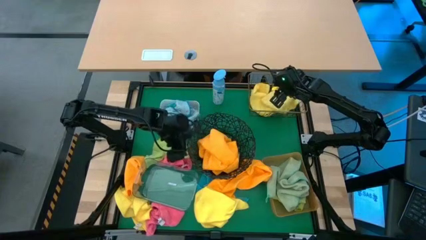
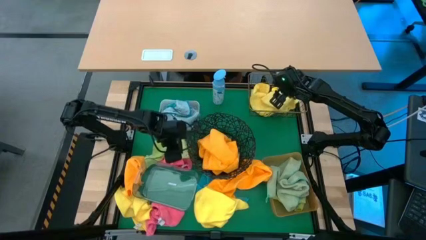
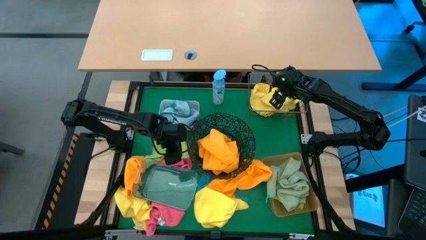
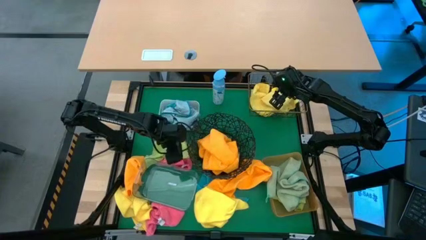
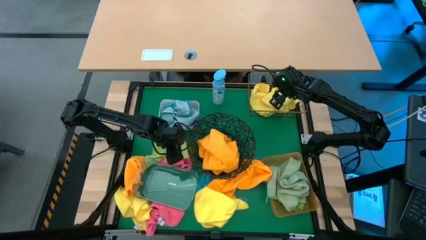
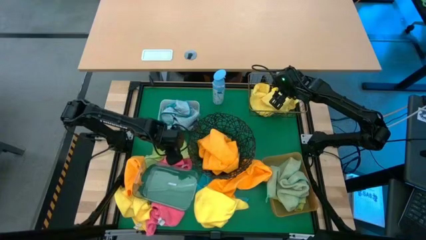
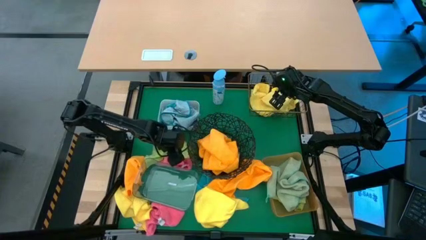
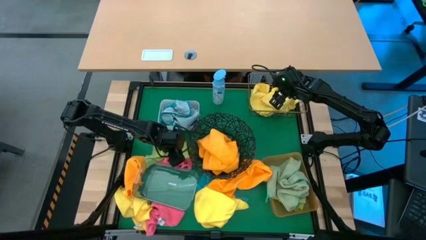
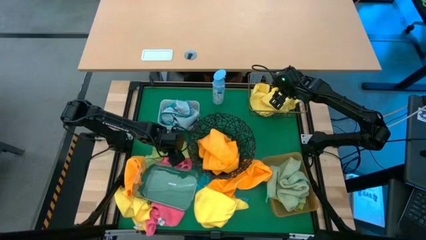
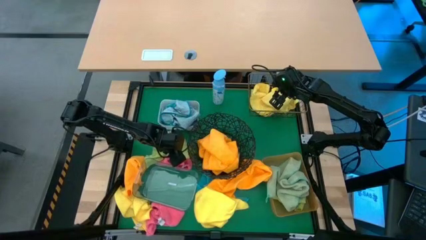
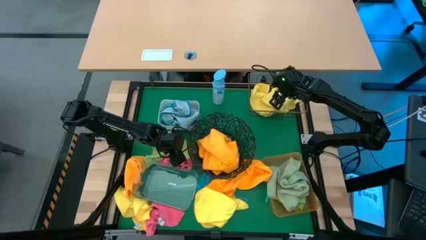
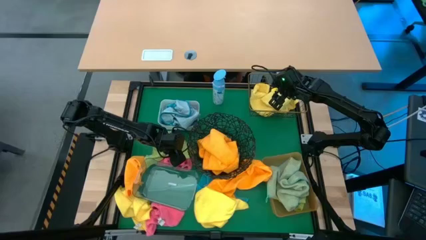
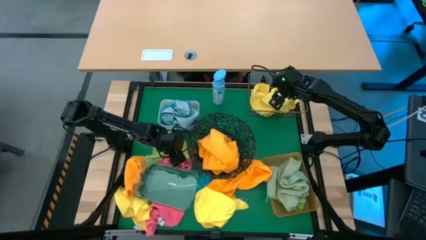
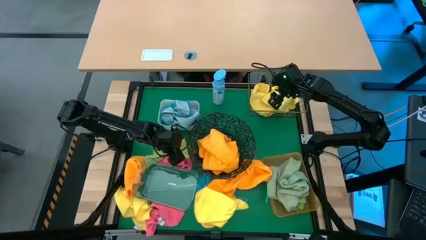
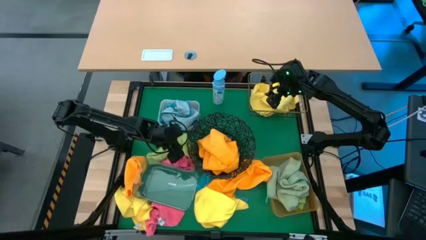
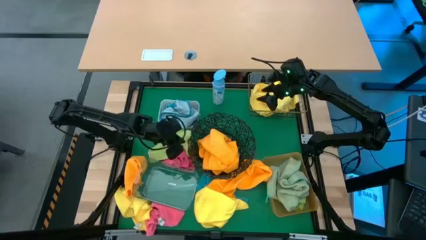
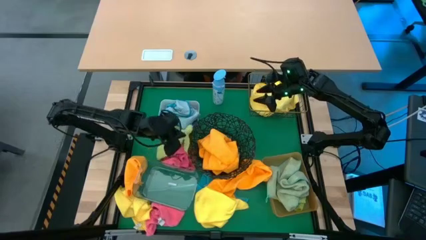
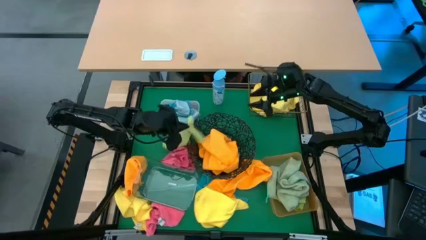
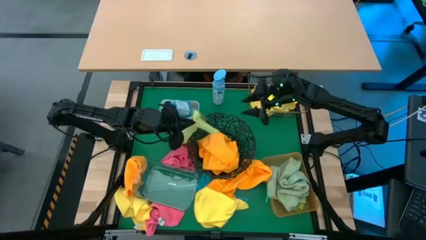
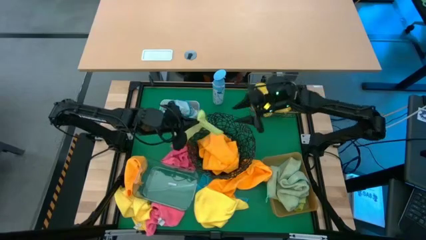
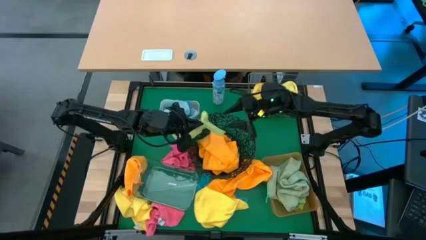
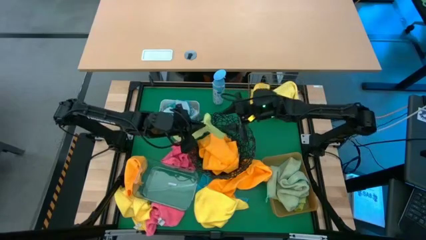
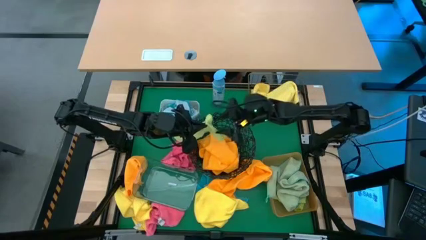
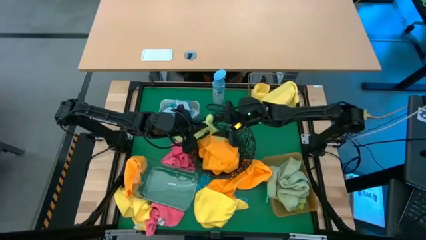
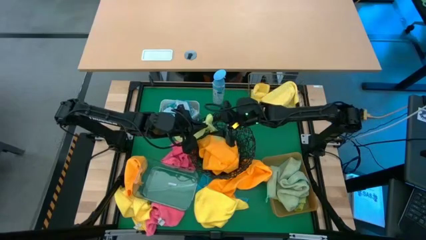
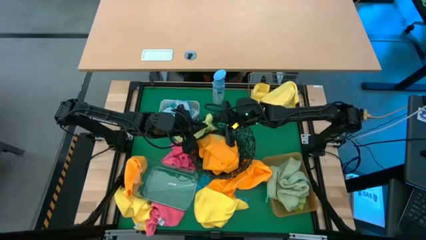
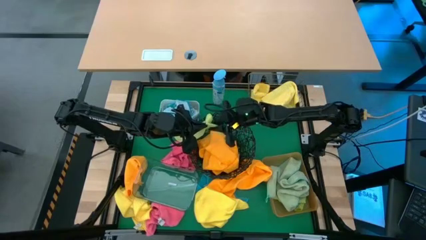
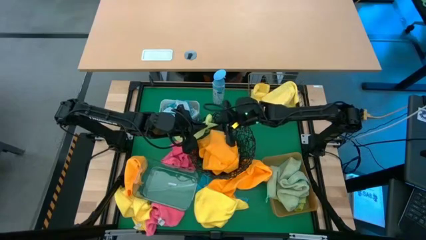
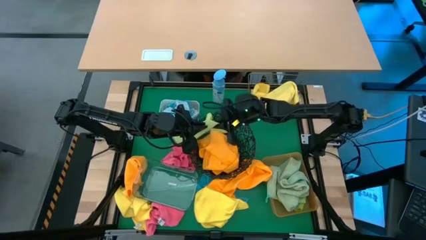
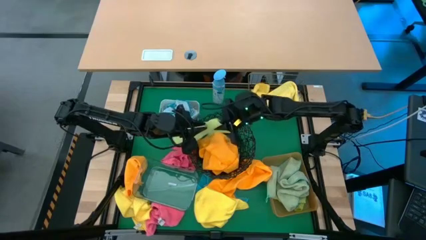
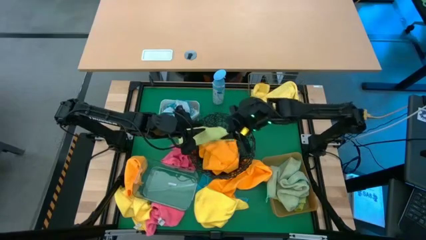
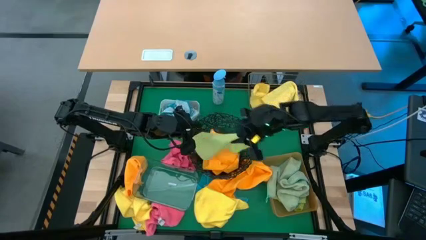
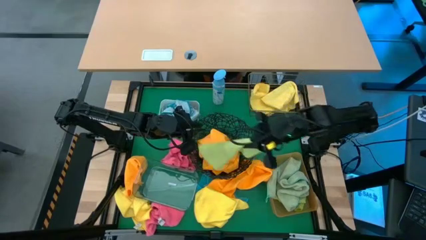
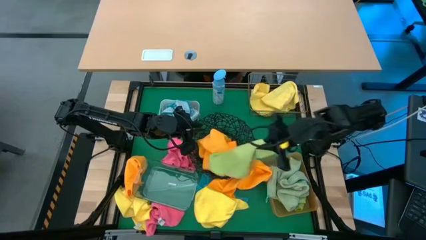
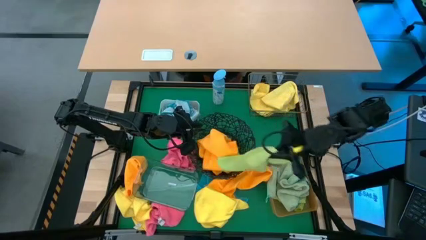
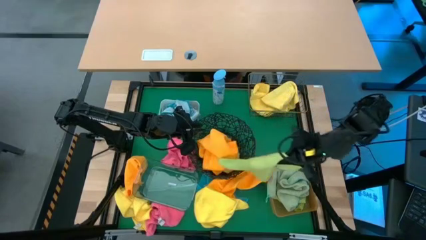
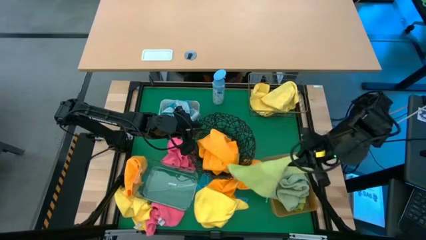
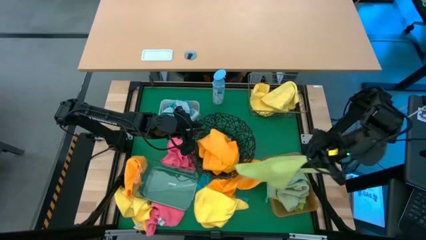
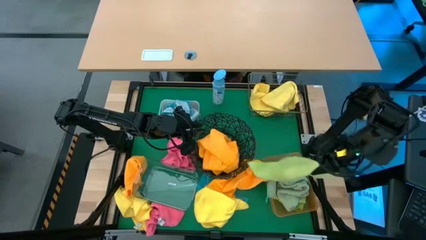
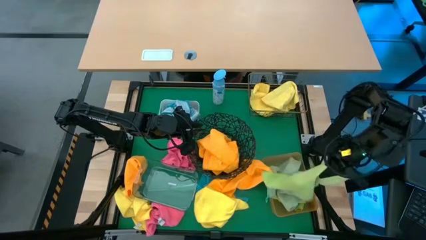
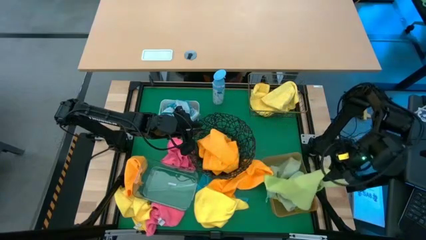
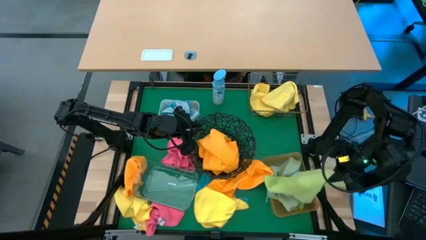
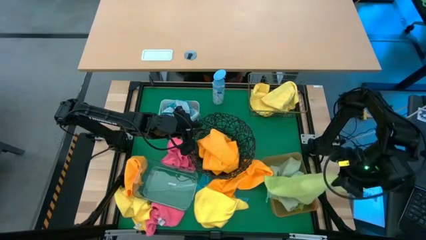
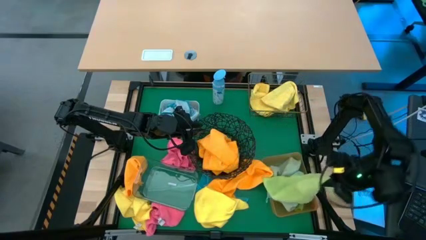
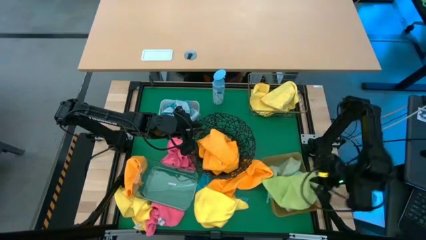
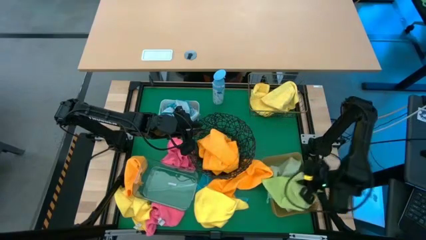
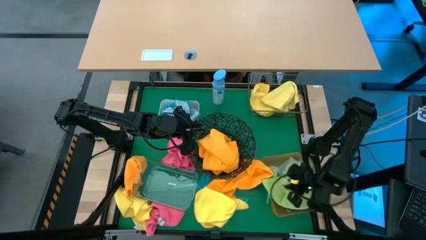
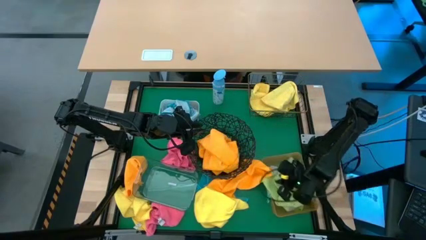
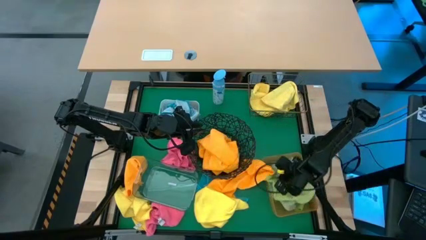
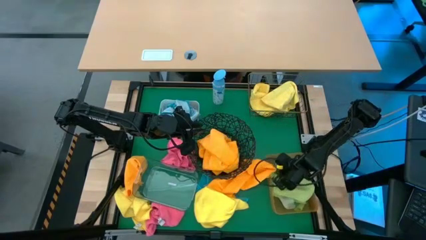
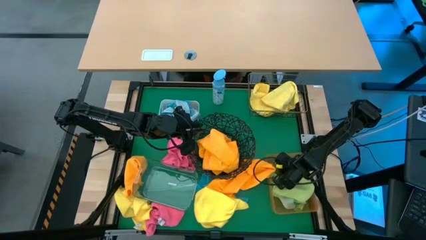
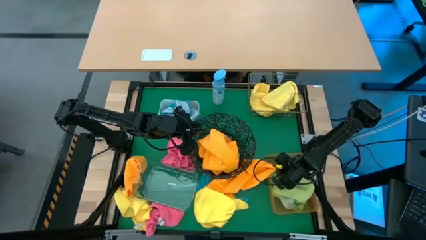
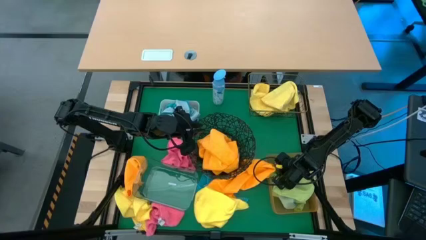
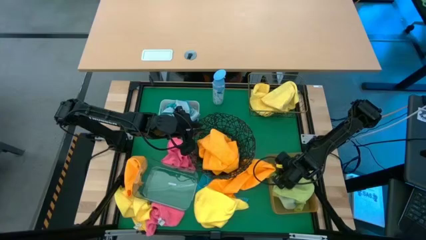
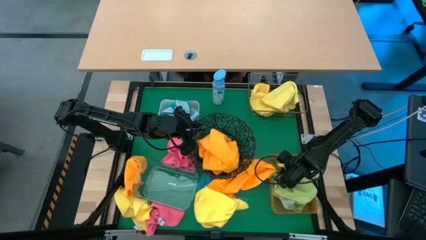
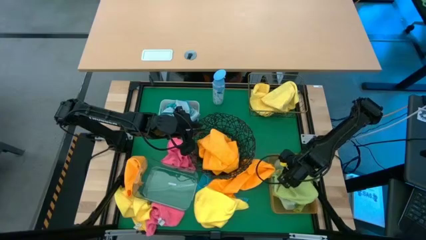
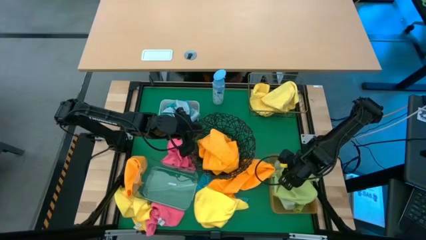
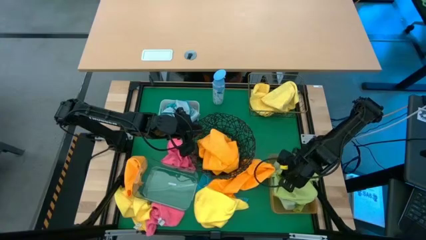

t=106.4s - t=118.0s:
Task: Sort microfiber towel by color & place in baskets
Put the green microfiber towel into the yellow bin

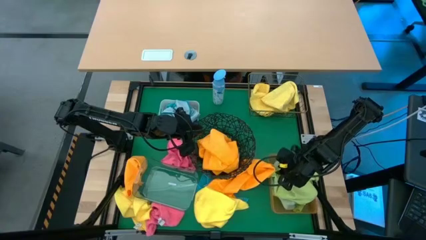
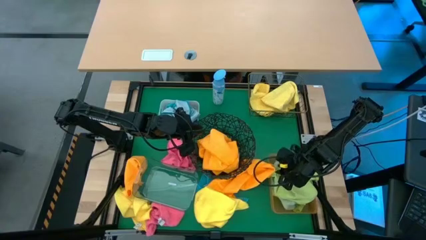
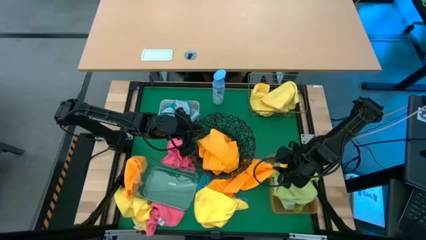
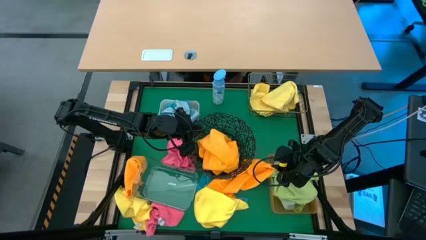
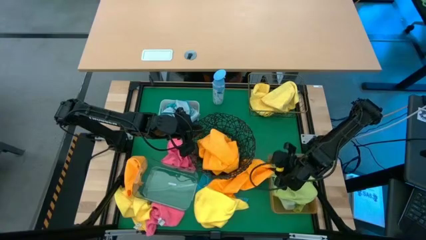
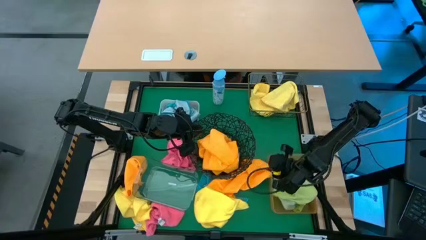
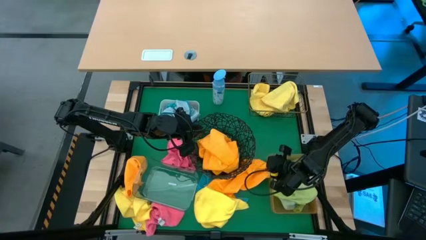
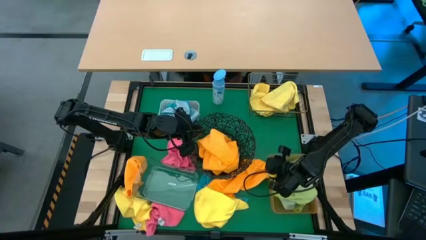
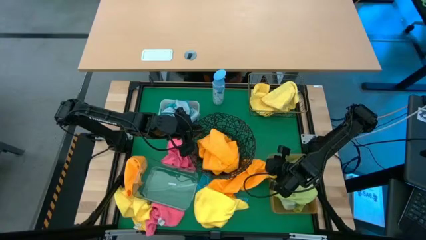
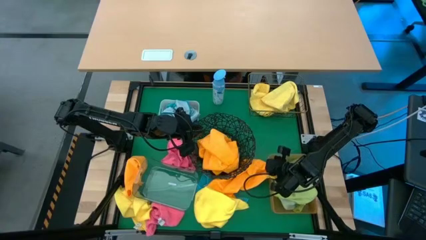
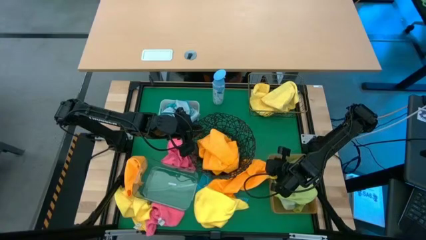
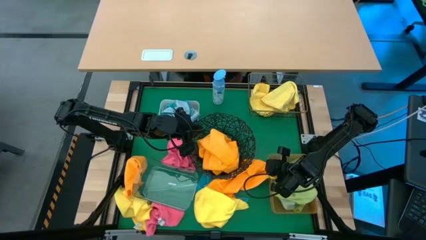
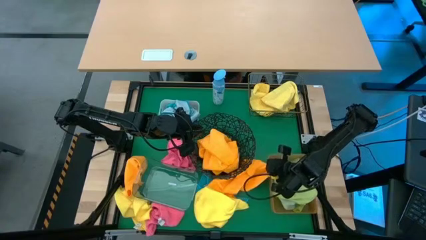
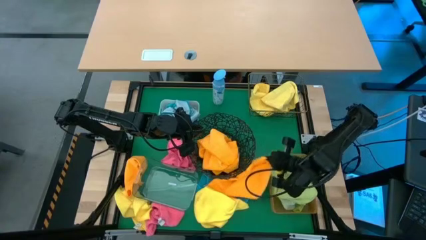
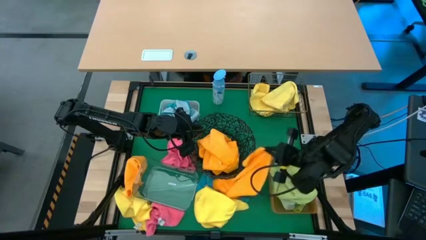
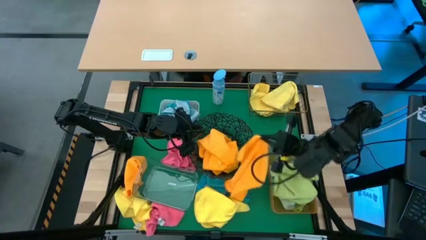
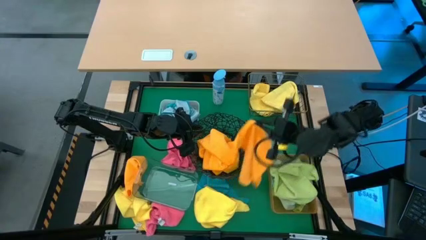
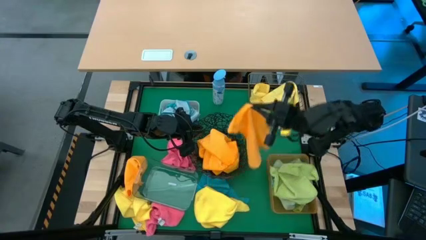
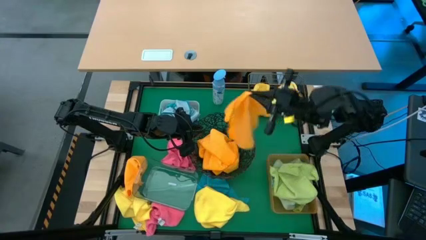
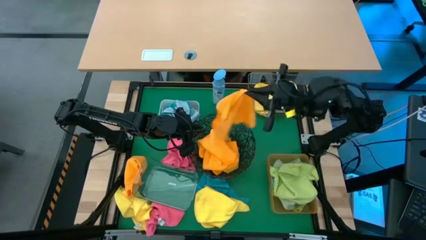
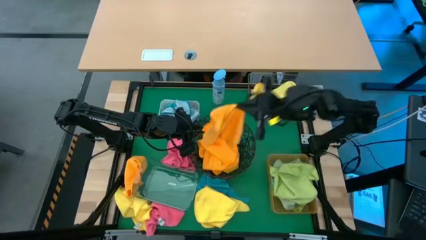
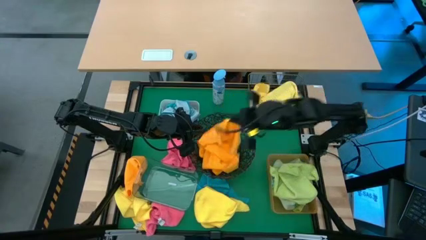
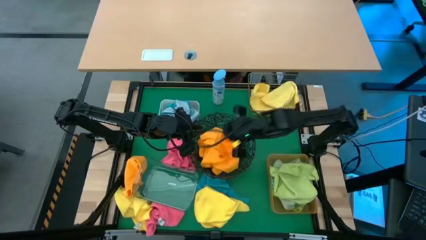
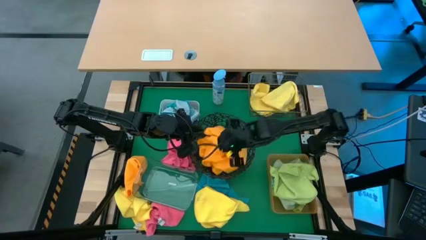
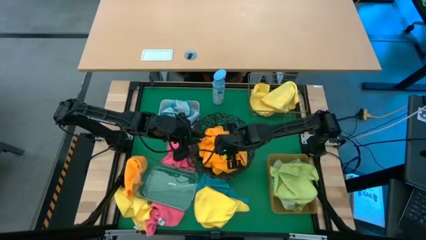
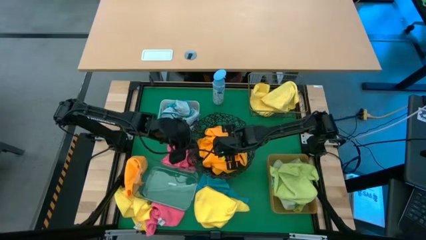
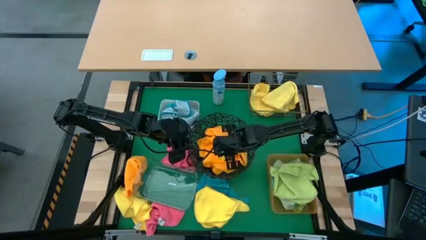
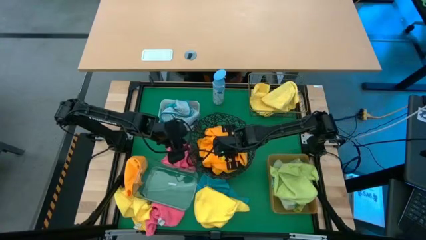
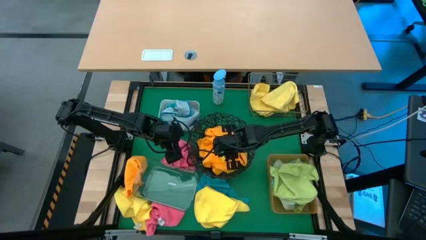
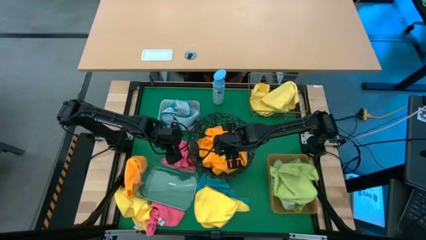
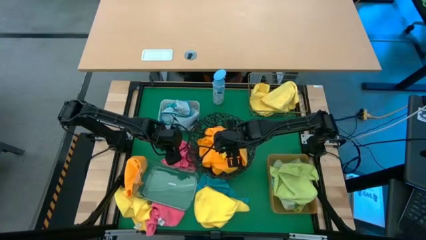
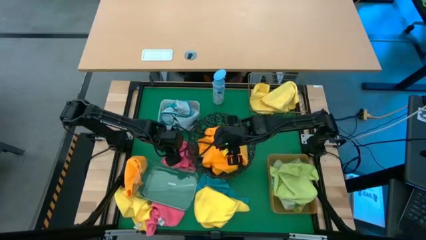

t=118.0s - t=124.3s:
Put the orange microfiber towel into the circle wire basket
